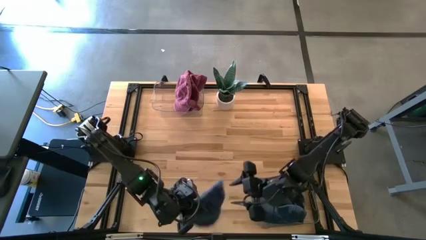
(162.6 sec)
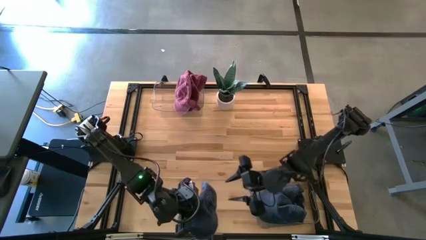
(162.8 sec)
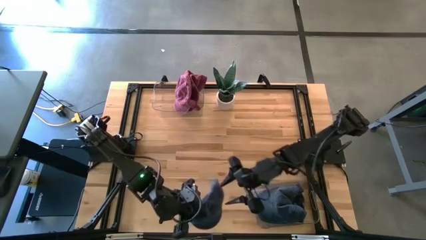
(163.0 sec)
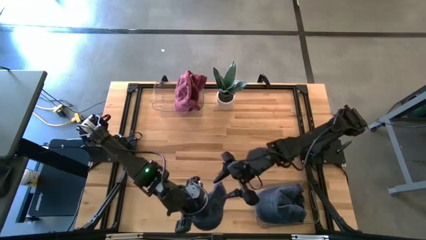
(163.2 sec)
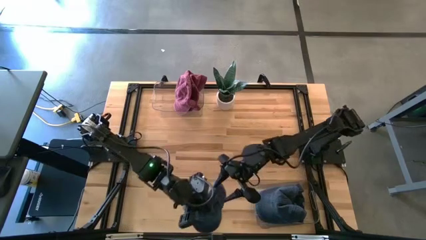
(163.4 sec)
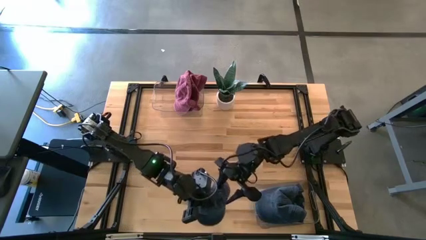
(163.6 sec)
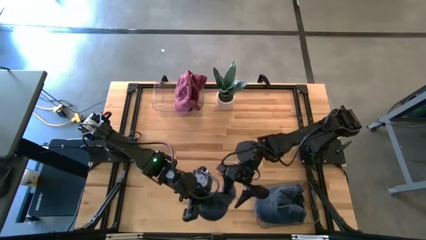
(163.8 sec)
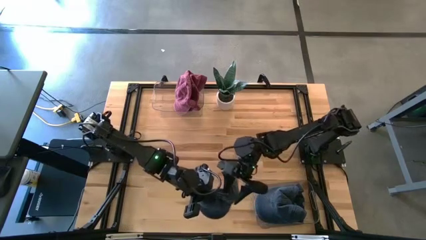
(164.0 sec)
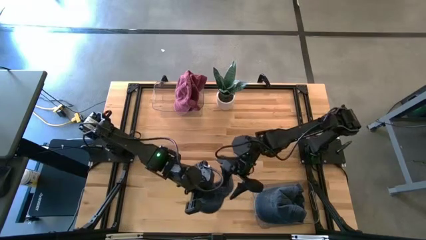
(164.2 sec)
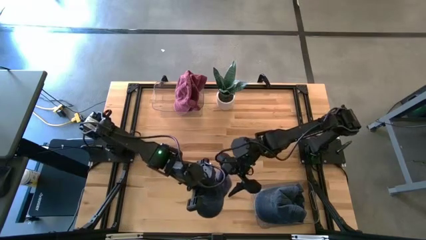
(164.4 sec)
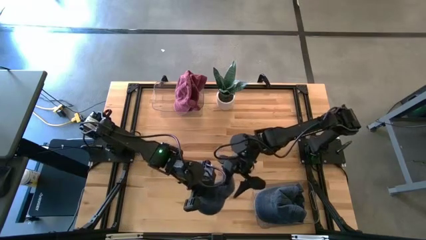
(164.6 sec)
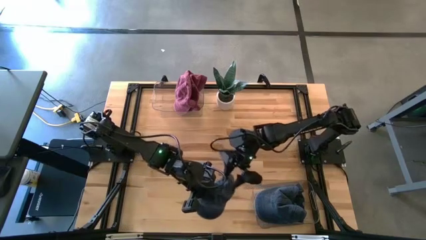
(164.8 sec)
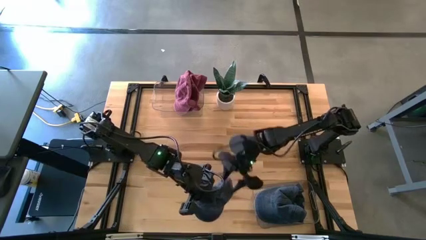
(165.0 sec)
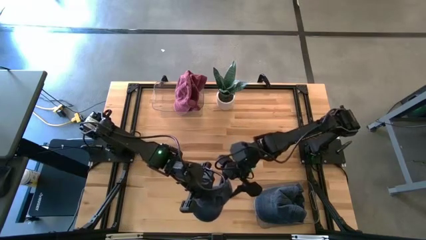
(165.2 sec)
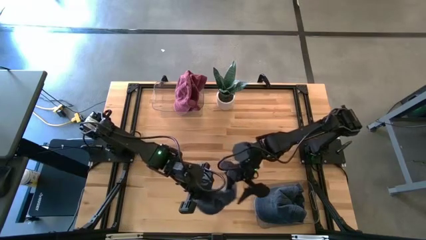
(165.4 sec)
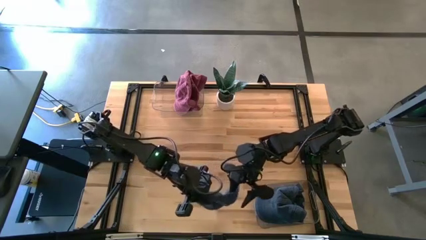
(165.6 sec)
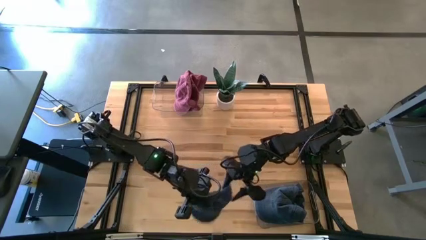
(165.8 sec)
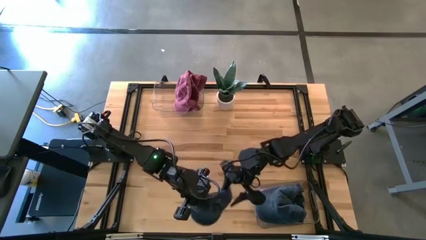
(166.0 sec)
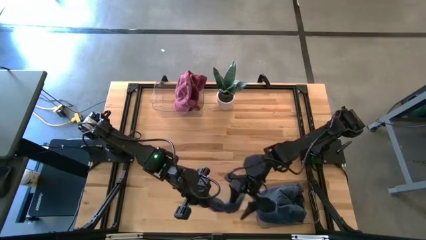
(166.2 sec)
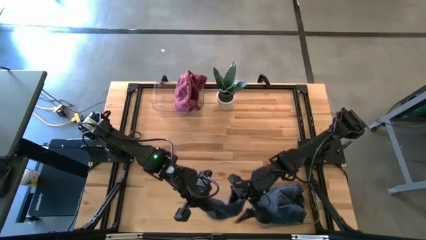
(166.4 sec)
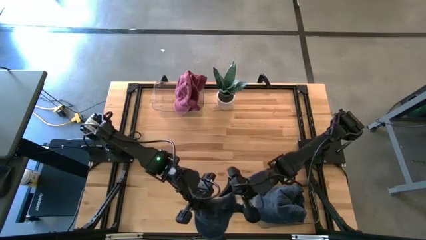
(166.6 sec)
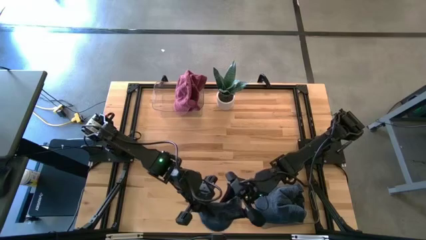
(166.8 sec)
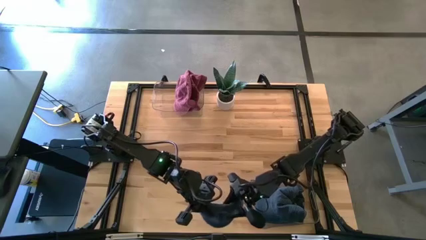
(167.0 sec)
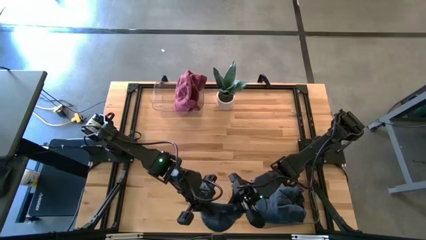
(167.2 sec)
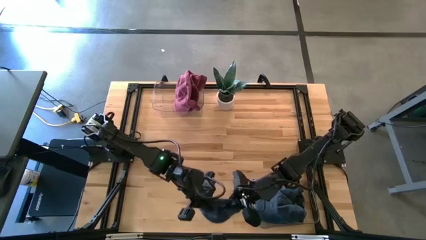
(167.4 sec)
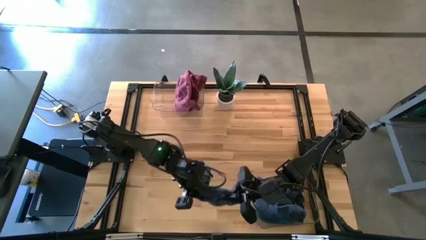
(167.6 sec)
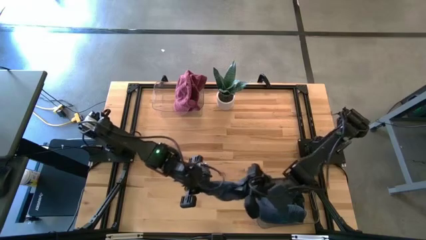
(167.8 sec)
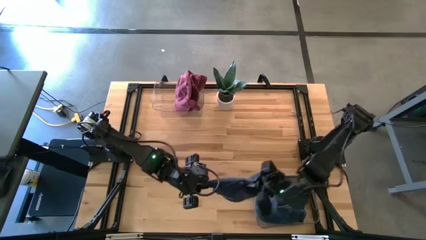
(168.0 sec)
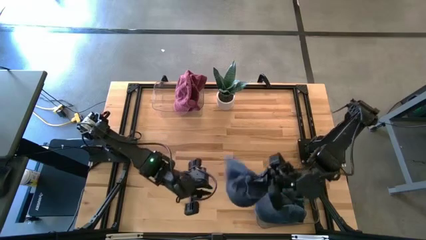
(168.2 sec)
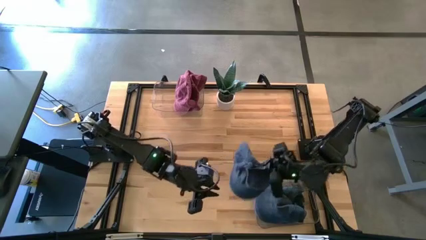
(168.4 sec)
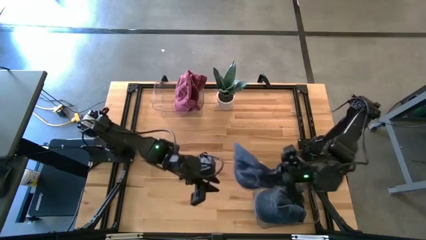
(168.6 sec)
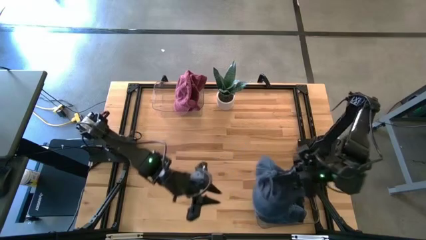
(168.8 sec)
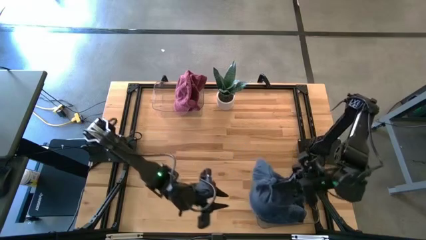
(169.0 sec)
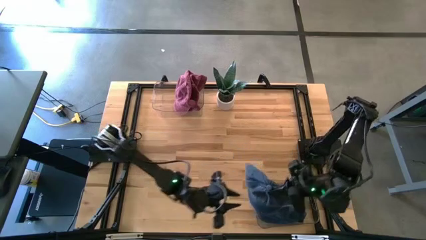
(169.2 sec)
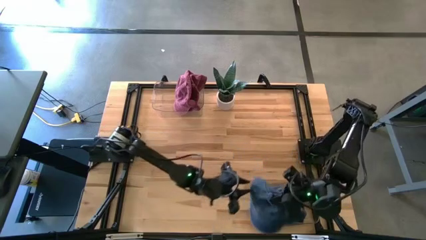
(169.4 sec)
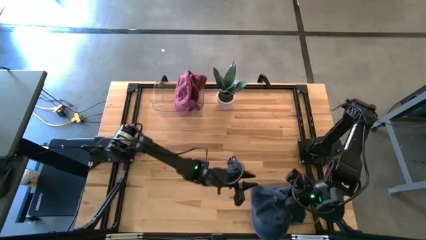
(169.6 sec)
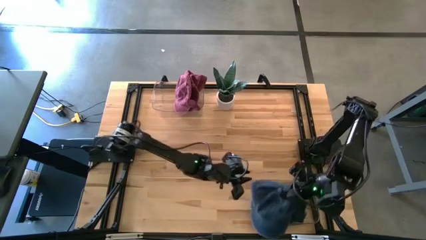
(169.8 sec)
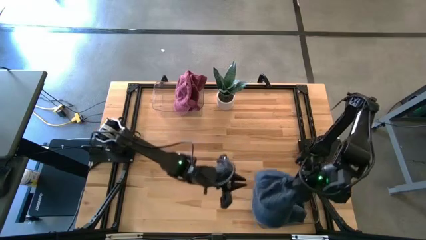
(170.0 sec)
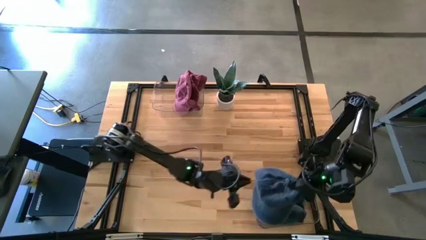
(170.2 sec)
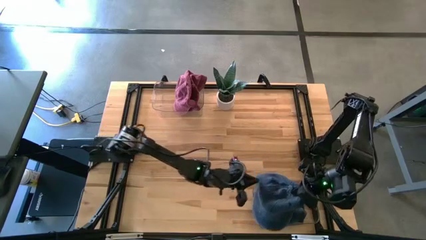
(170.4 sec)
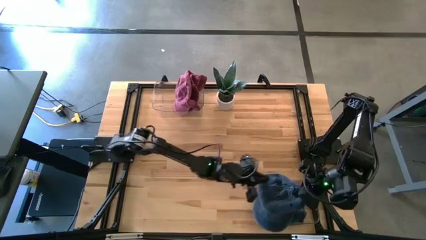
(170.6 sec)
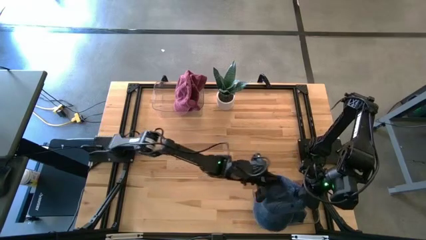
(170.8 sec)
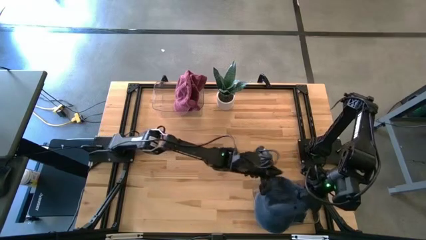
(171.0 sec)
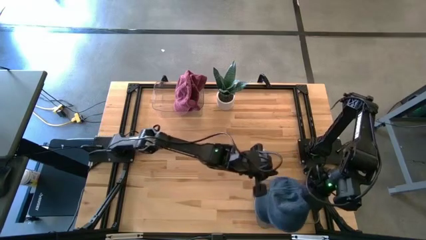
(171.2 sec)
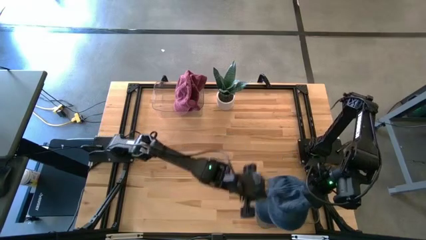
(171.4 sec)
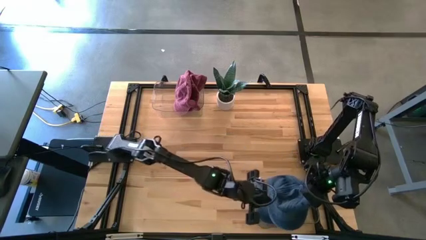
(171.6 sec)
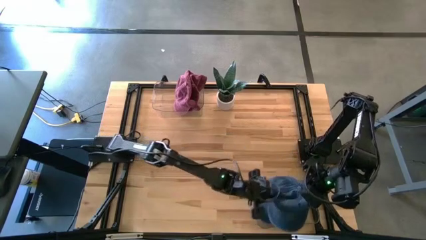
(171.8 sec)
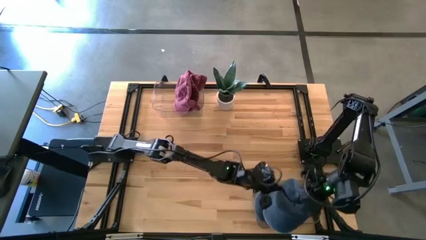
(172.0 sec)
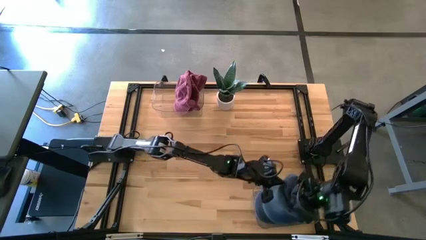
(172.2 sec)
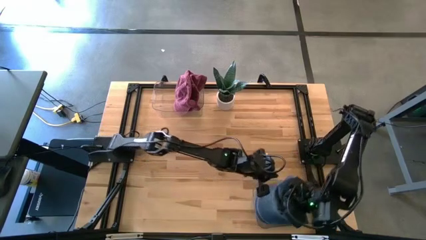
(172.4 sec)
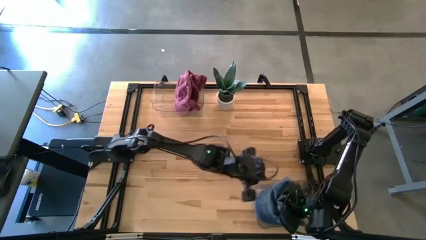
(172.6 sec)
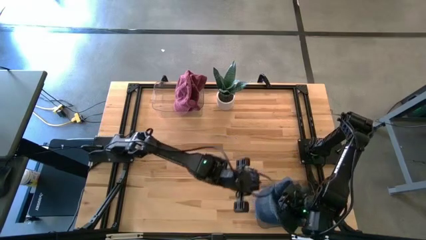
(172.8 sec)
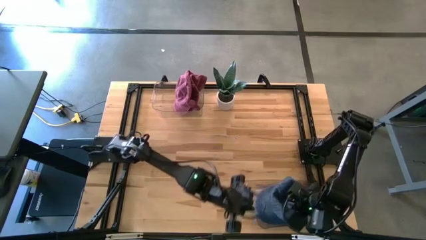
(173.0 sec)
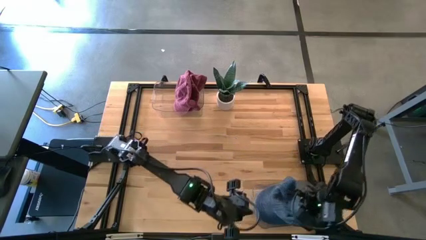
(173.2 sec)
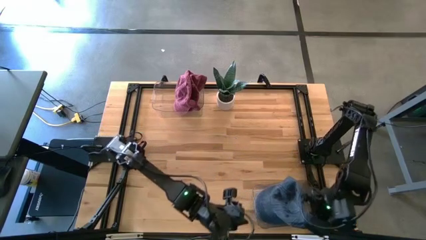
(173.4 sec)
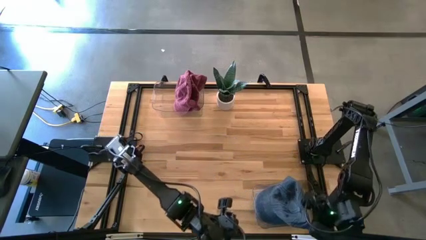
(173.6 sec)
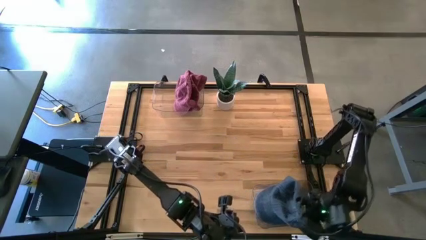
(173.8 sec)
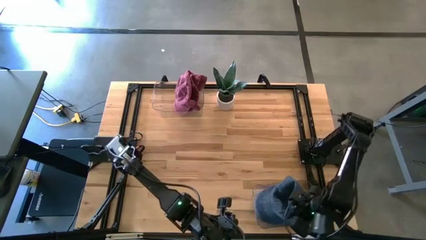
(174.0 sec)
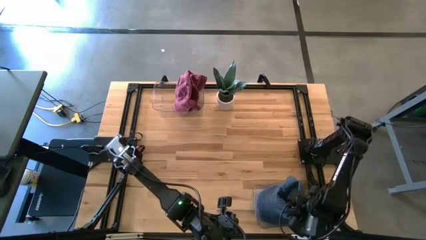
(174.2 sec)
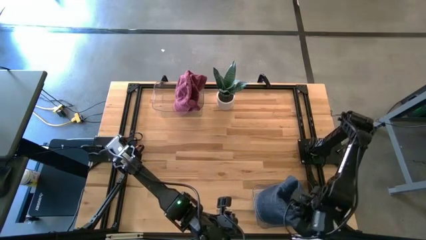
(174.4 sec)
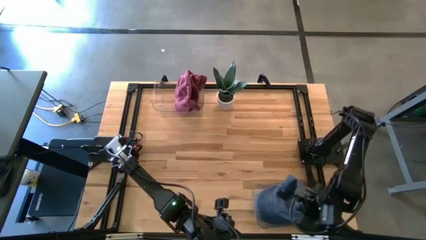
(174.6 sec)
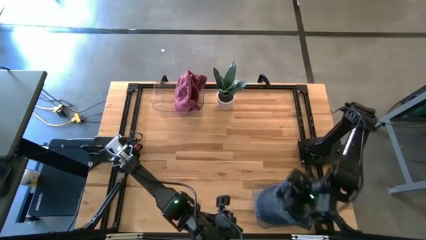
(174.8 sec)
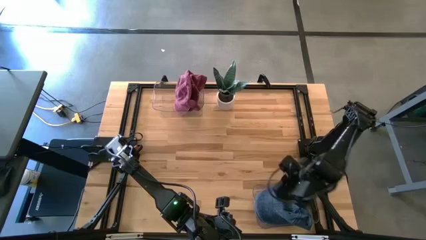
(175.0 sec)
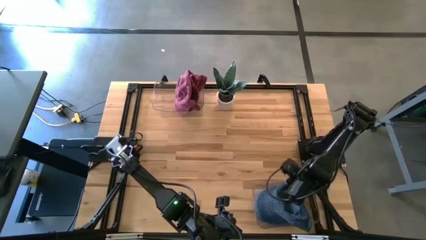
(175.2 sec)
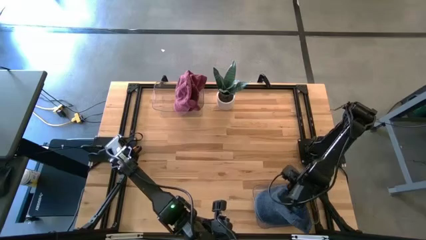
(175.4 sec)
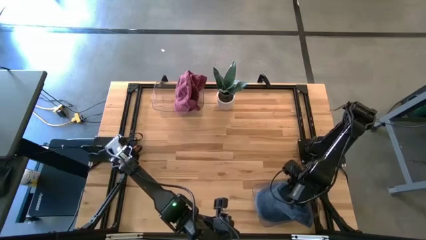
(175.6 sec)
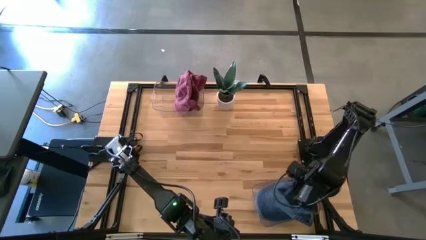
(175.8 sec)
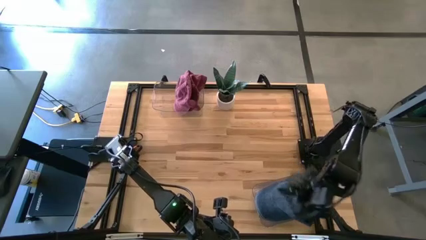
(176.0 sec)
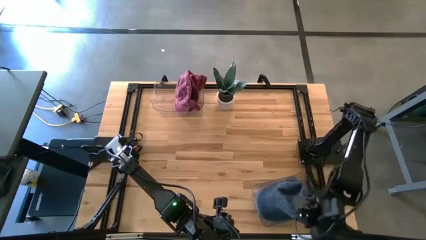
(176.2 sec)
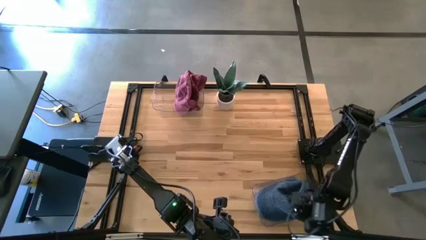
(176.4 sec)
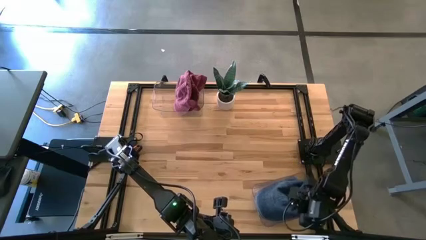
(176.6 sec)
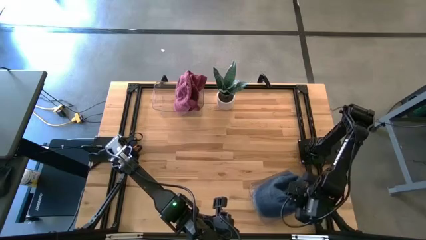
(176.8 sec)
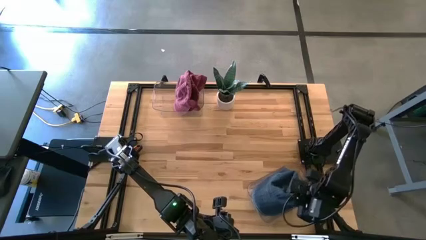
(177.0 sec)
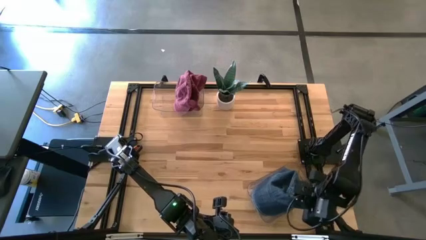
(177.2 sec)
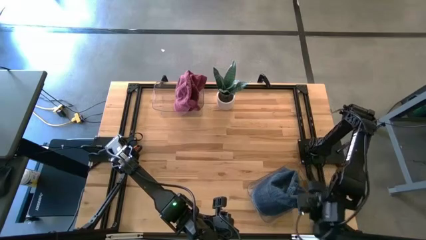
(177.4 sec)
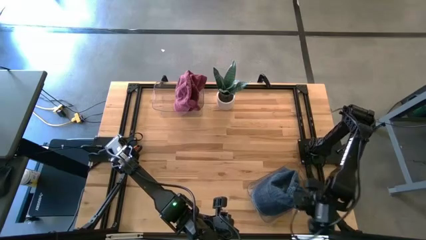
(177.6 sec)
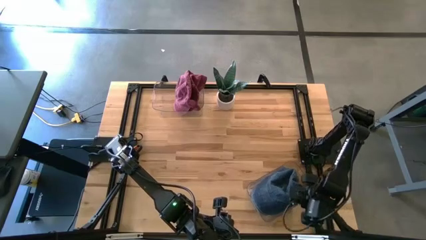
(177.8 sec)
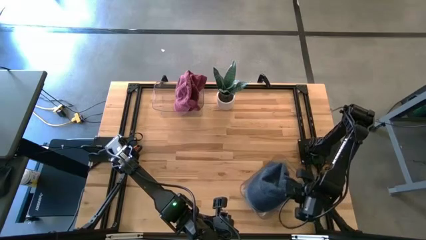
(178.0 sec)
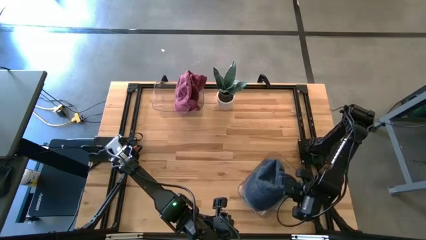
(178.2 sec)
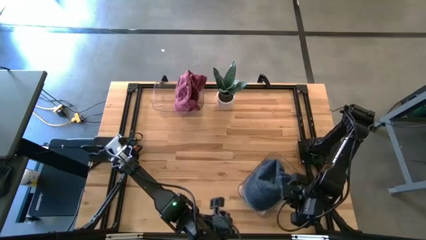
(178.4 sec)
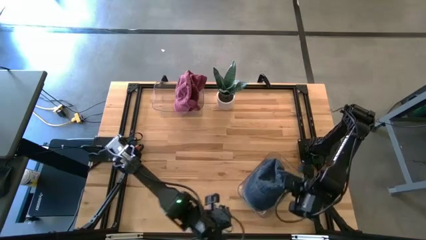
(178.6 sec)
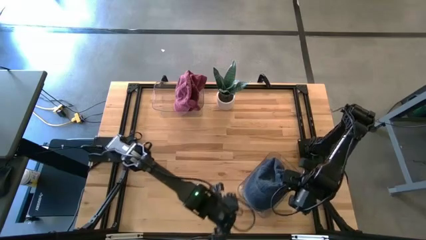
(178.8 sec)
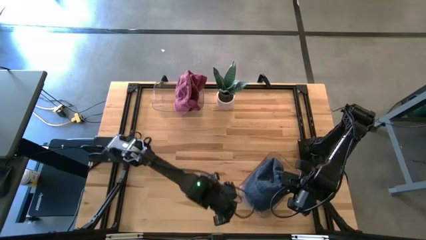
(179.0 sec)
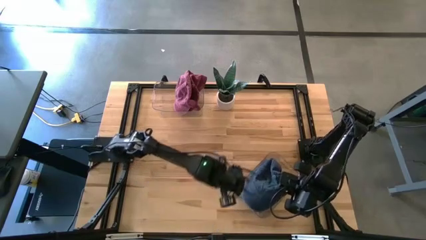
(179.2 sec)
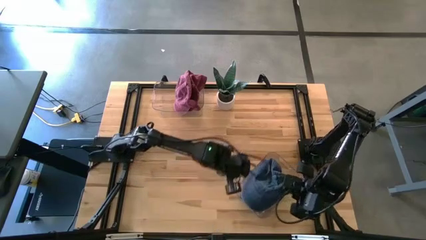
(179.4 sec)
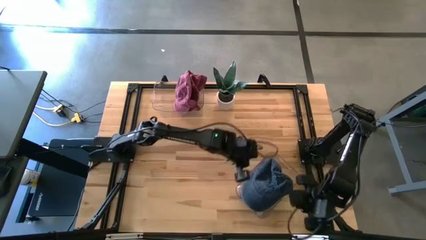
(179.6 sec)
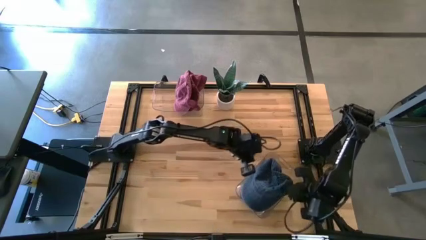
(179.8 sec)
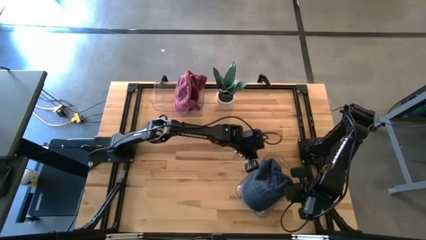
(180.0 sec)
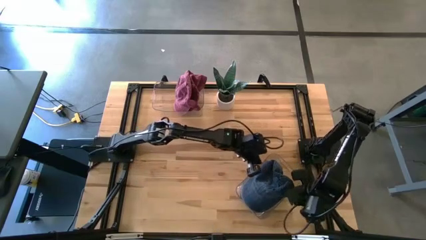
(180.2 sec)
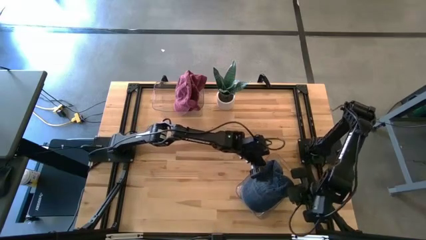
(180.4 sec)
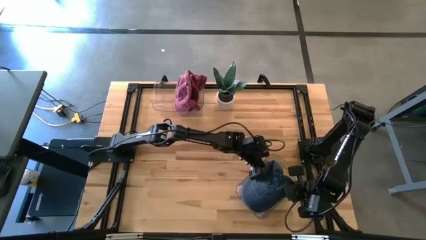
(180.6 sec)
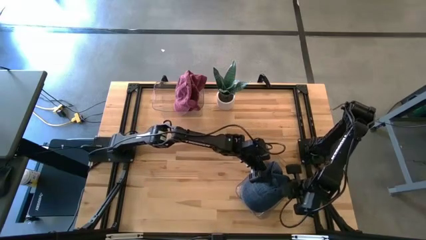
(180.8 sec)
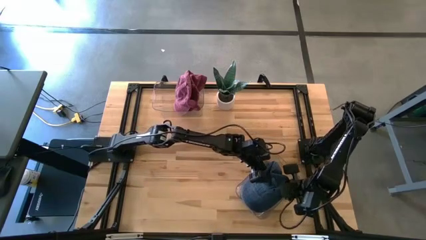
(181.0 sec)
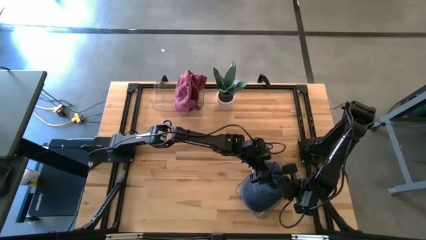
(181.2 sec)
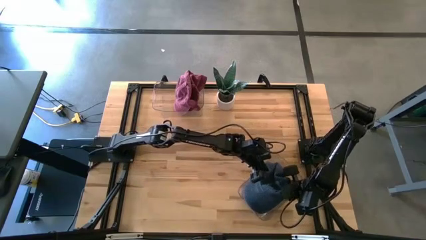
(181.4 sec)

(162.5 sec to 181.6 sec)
Task: Pick & Place hat
Put the blue cap into the bottom transparent bin
